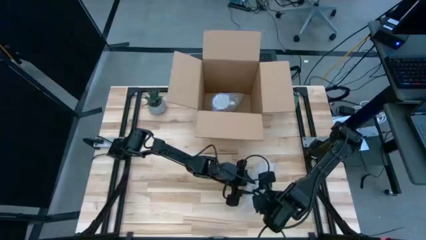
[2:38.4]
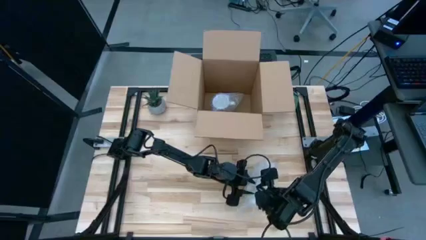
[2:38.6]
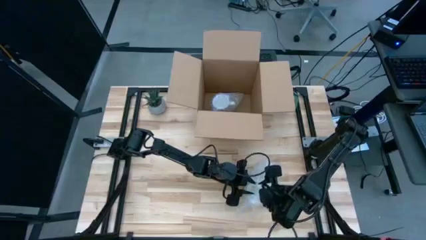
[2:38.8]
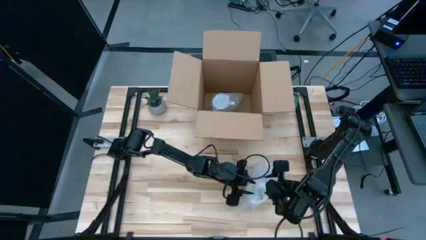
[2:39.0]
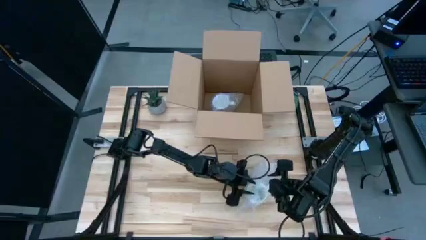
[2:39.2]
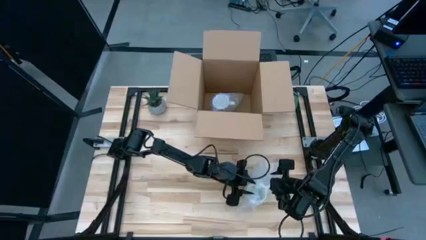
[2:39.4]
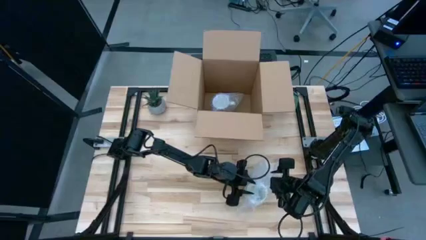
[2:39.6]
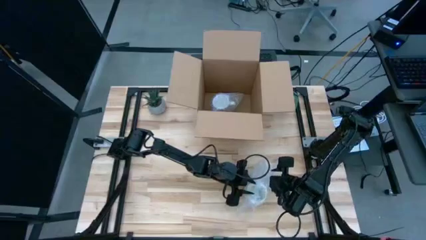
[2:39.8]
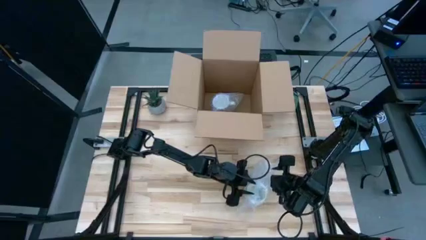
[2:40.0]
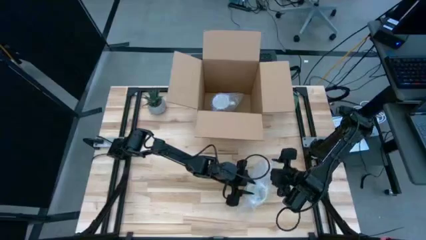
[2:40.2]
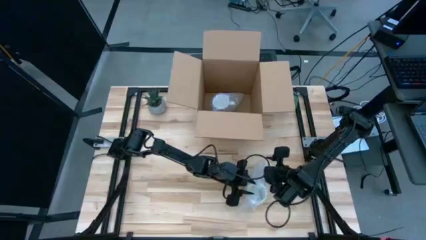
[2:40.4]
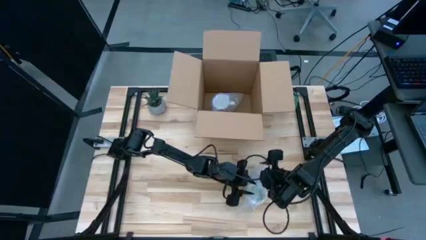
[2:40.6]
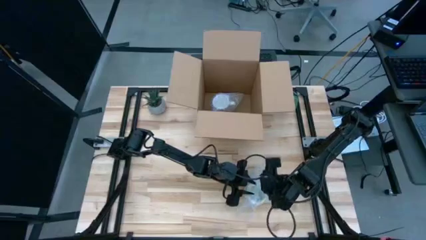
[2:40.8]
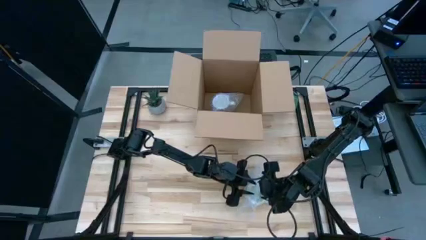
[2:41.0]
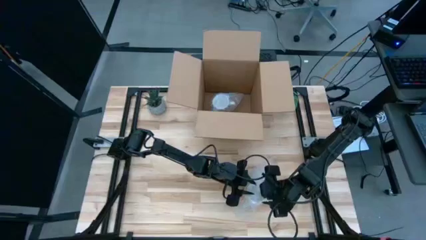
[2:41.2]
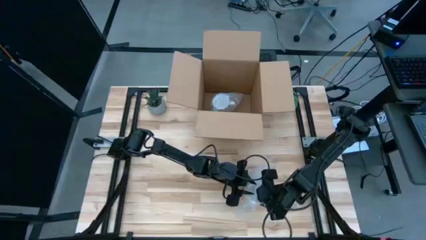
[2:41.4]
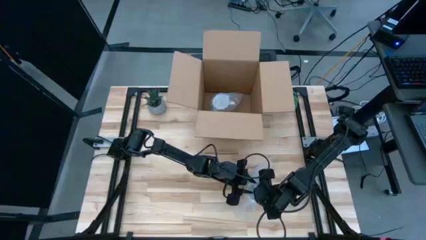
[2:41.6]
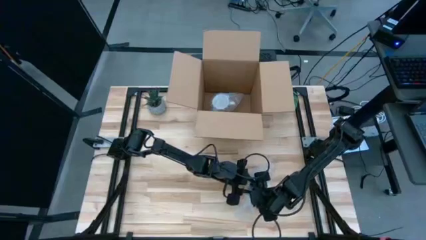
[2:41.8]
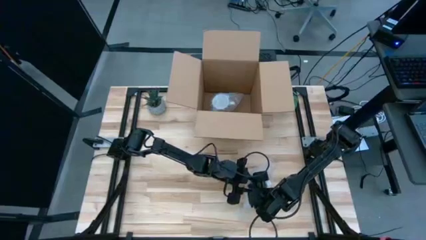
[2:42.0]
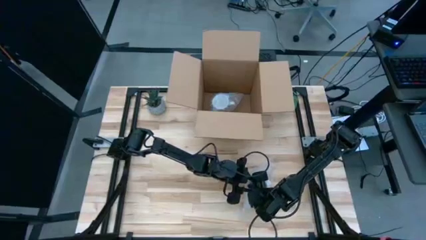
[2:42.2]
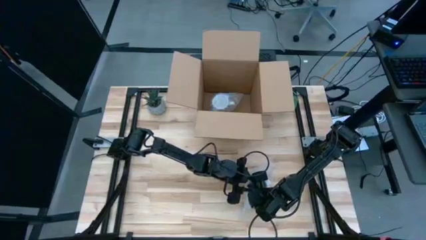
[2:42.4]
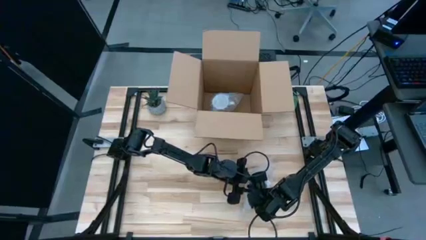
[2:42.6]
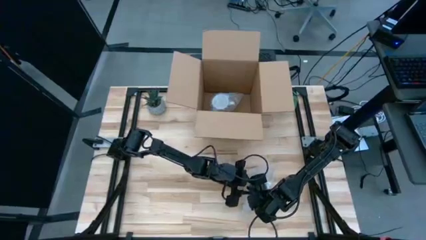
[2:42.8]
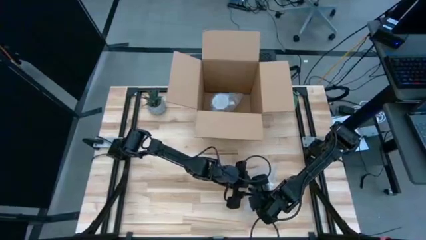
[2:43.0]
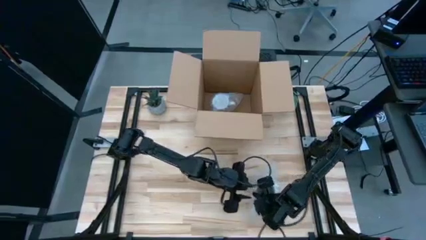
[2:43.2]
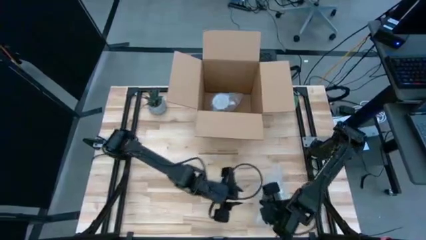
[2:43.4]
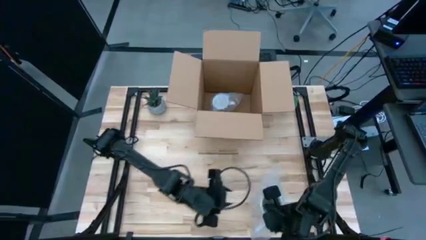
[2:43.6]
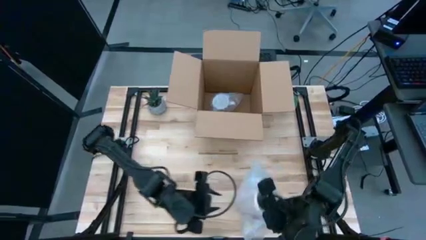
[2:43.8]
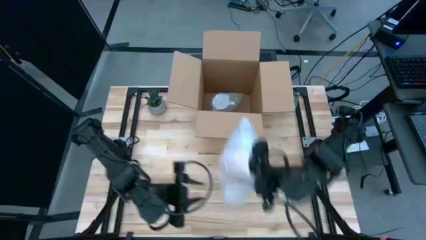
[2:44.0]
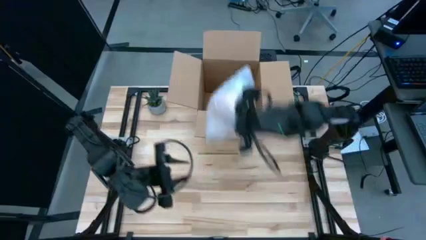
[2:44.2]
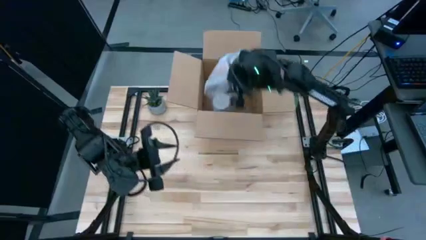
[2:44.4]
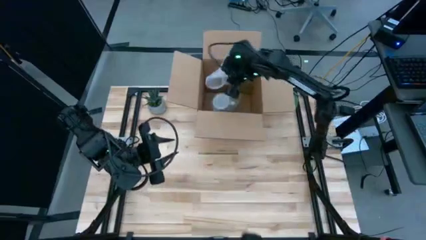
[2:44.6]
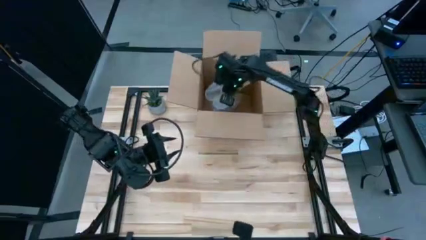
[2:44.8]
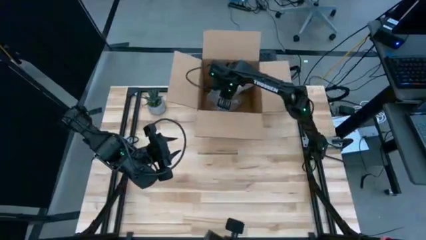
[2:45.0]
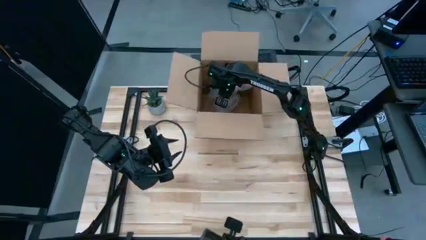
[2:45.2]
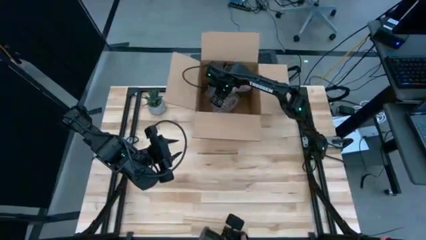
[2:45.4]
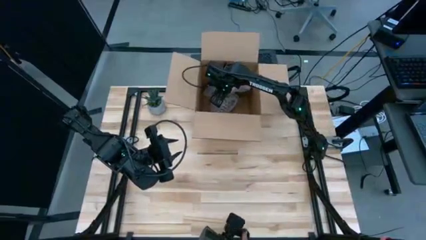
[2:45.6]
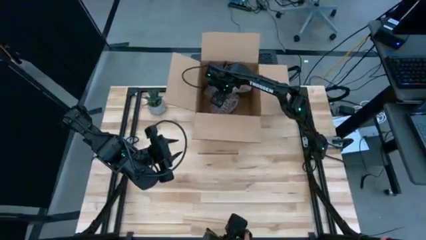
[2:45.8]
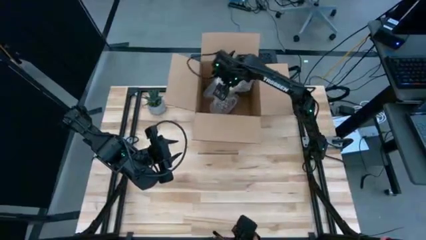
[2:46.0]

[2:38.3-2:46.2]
Task: wrap mug
Put the wrapped orange mug into the box

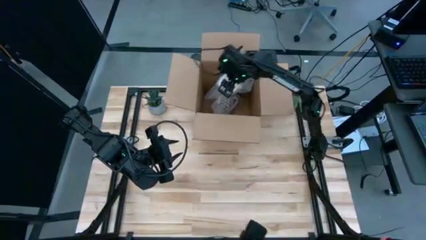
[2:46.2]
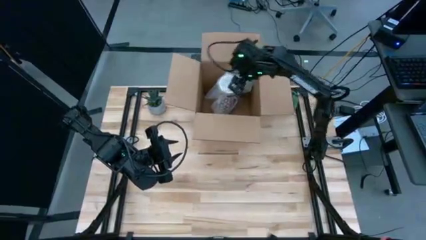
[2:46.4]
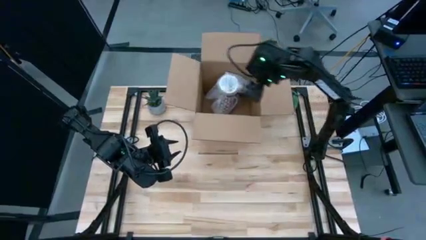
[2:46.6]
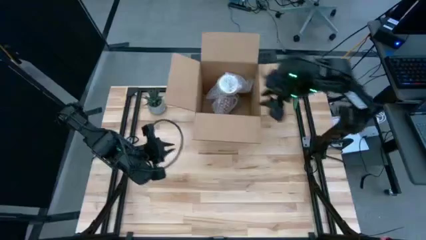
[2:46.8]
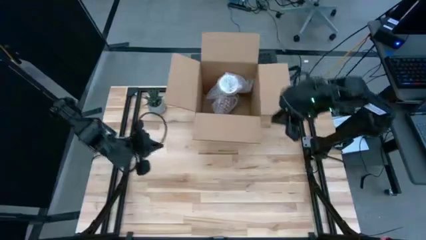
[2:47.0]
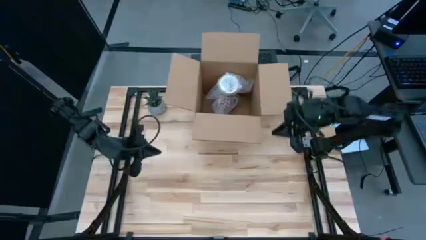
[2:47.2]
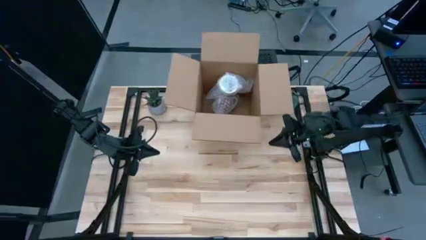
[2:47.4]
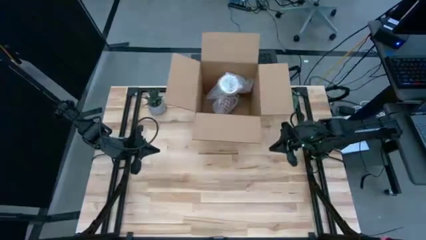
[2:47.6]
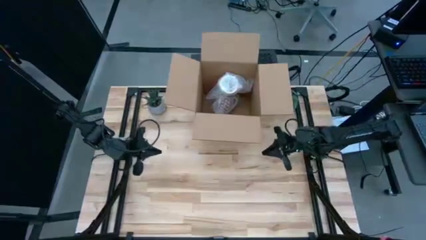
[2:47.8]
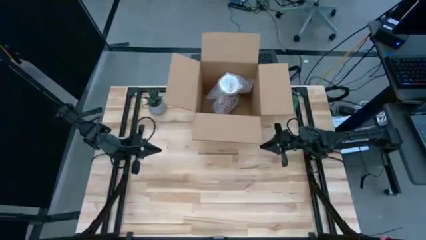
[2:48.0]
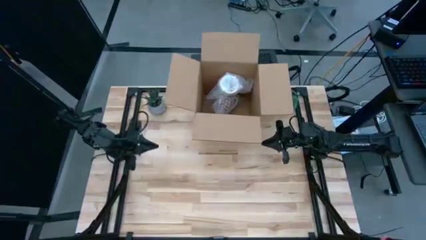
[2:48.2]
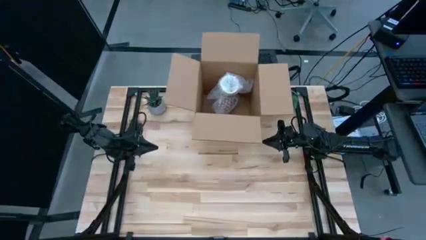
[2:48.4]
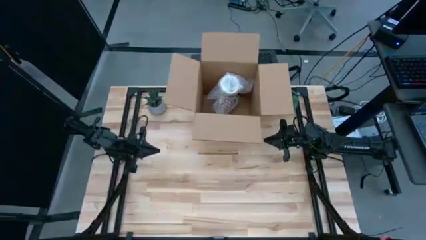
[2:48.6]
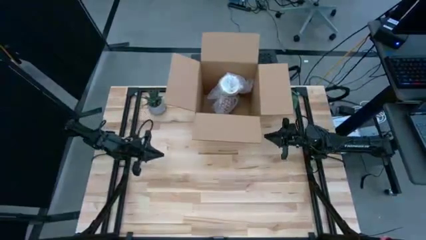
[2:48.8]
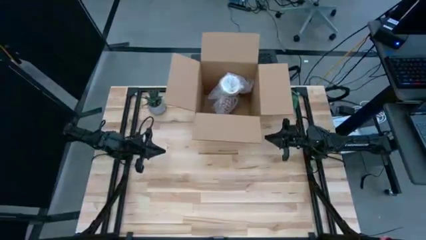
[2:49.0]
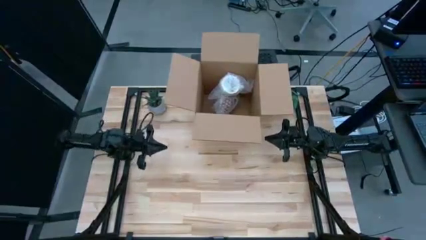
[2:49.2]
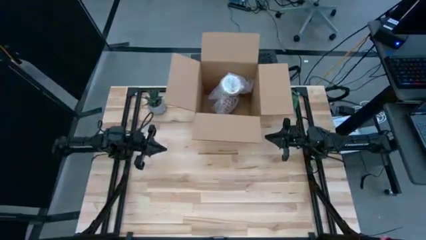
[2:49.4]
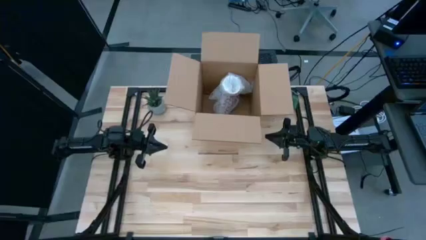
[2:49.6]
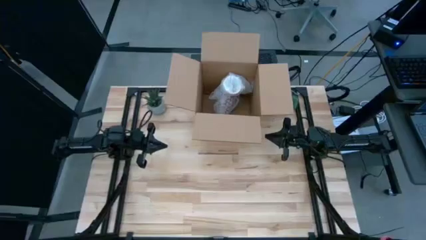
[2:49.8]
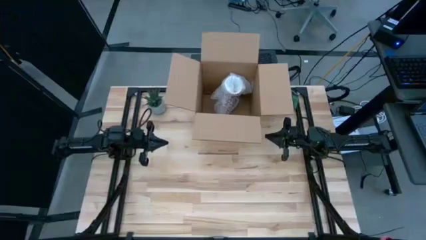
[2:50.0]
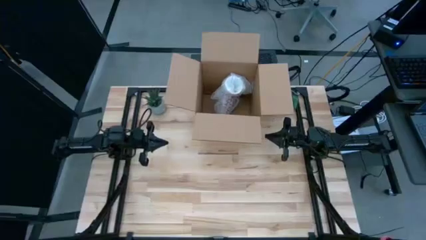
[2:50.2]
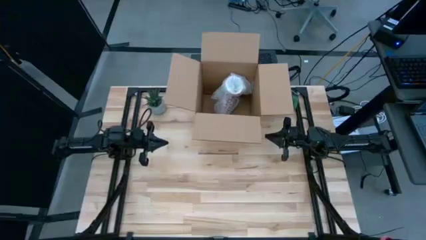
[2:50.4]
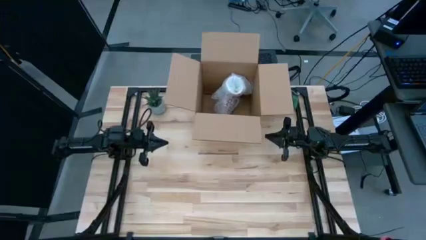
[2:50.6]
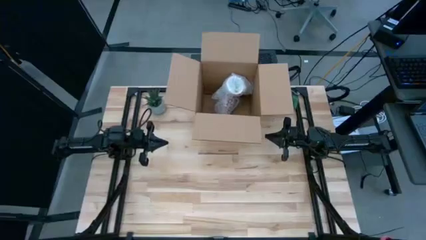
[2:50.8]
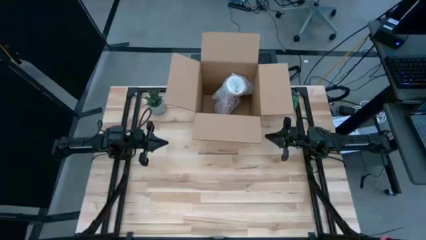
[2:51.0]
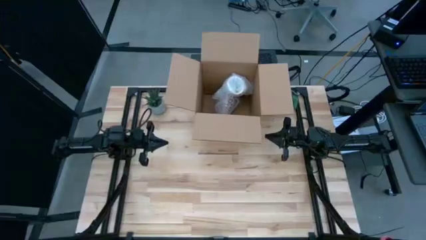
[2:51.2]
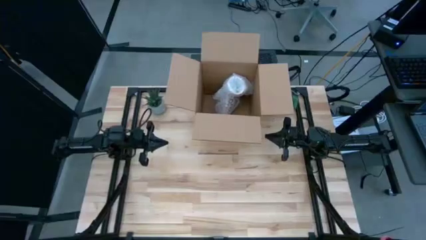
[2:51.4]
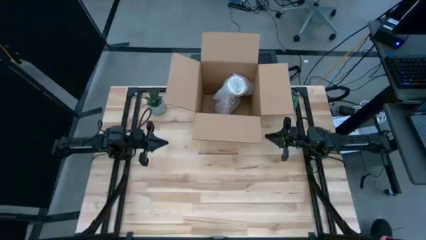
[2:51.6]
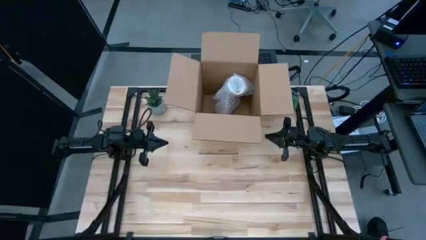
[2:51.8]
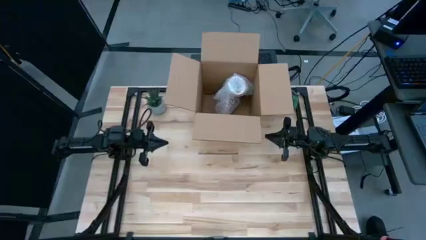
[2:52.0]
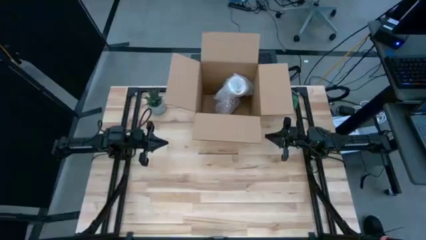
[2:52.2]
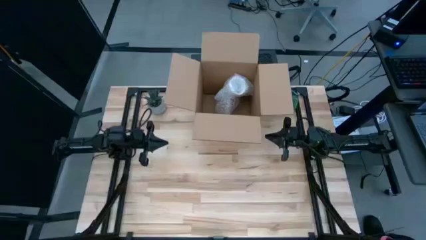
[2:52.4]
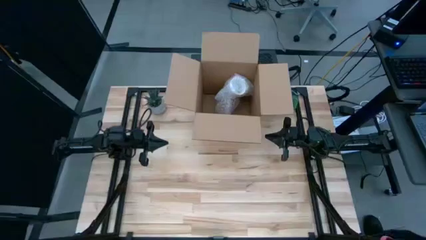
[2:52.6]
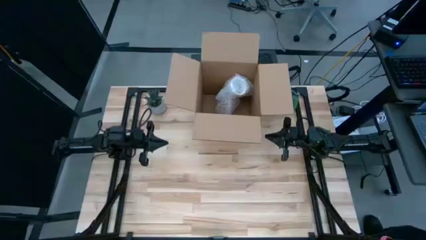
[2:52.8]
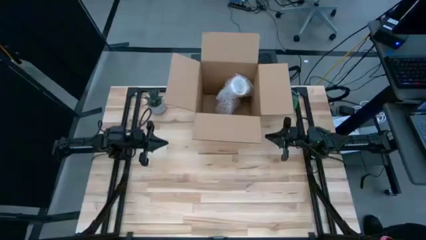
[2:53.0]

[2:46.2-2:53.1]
Return to Home Position

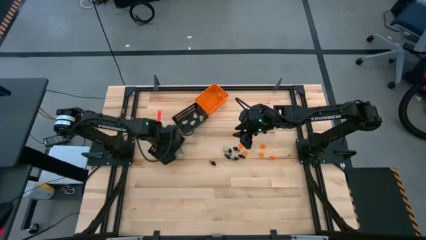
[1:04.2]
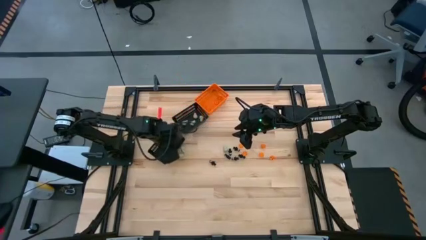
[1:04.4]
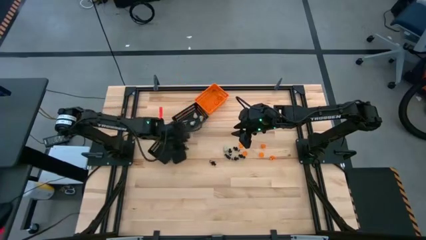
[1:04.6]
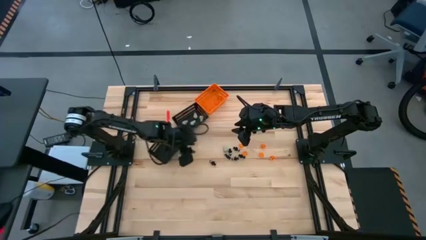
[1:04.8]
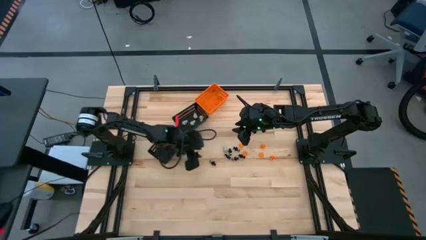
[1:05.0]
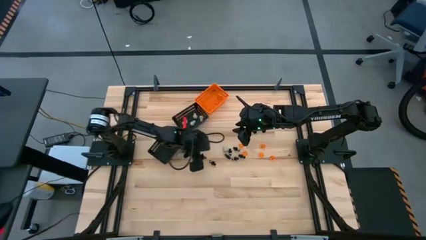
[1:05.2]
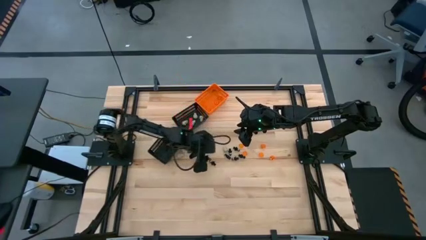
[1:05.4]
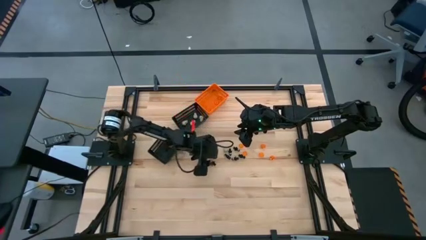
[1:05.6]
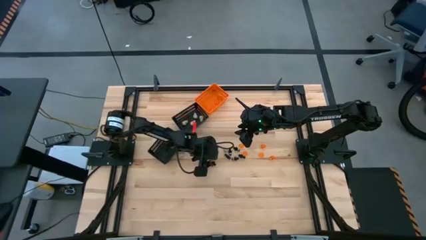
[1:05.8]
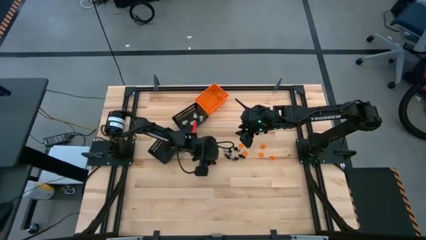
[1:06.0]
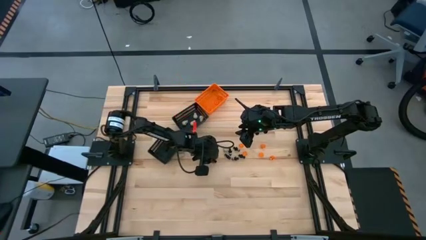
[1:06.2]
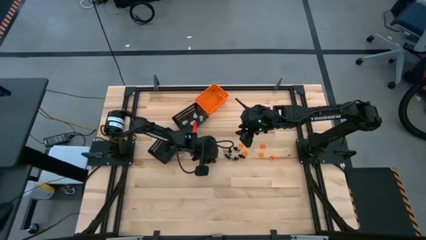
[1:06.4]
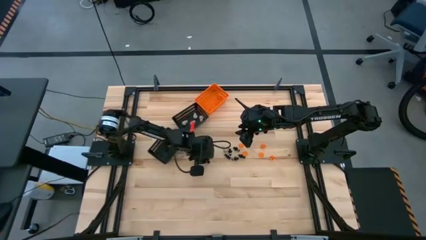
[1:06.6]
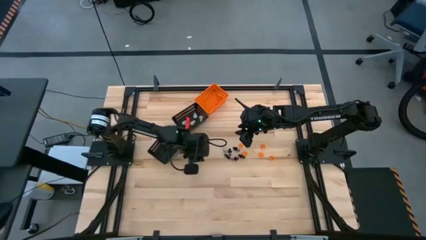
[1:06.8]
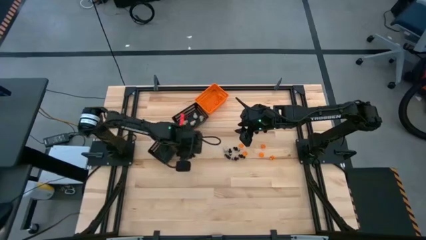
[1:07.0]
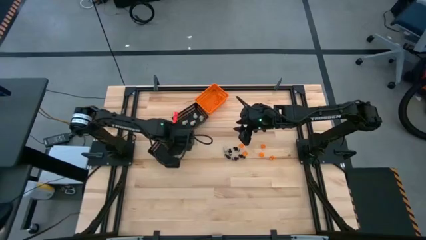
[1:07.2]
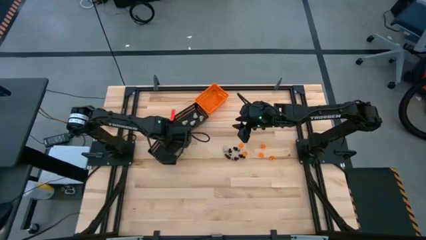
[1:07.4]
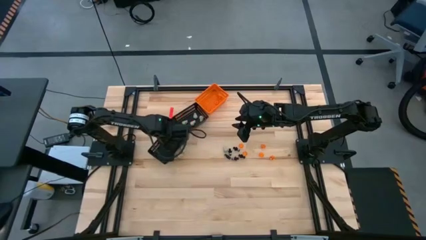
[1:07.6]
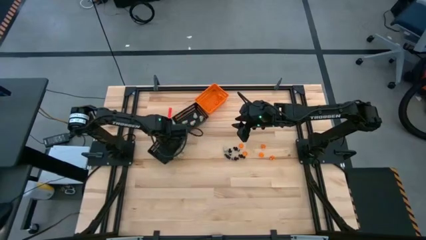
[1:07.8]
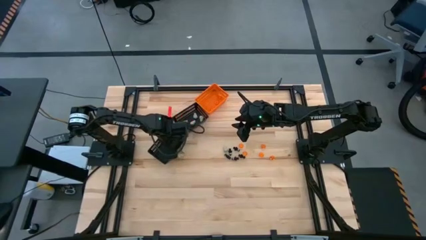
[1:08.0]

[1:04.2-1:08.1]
Task: Sort Halloween decoration
Put the black voodoo toy into the bottom black bin
